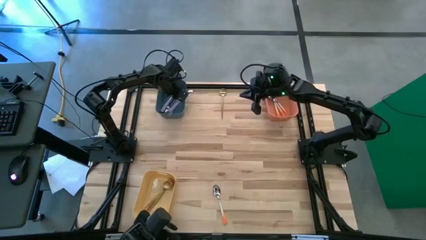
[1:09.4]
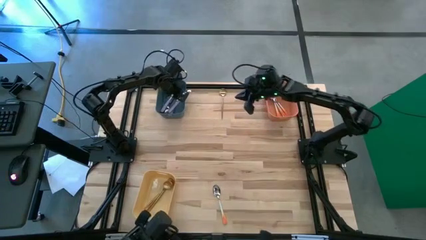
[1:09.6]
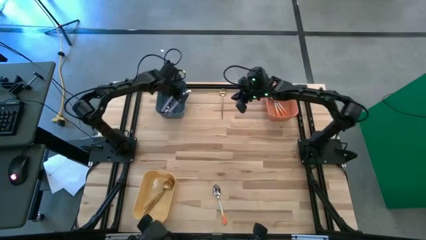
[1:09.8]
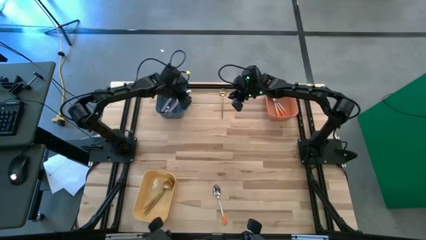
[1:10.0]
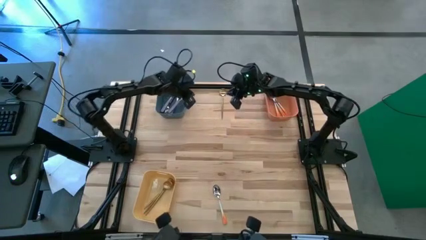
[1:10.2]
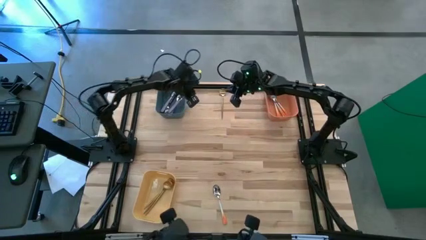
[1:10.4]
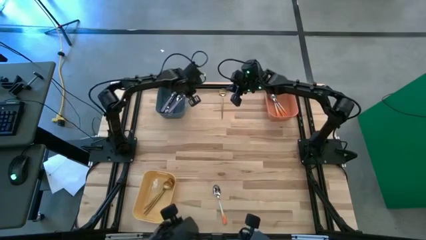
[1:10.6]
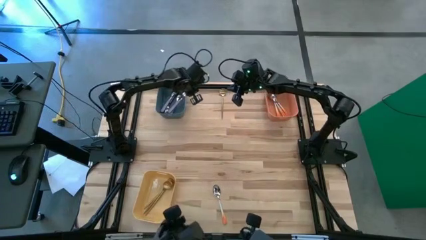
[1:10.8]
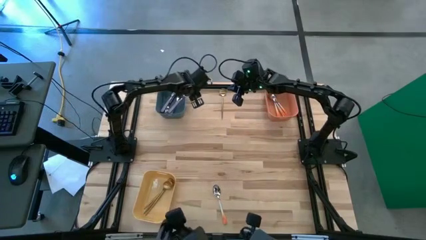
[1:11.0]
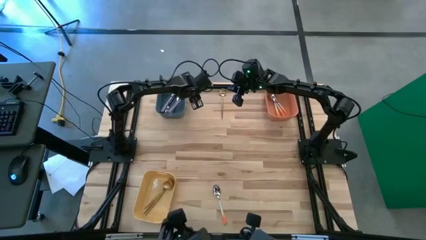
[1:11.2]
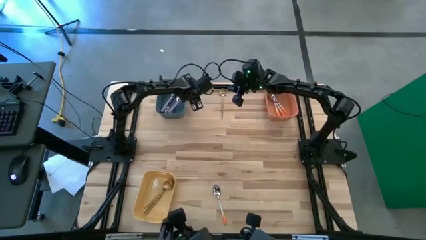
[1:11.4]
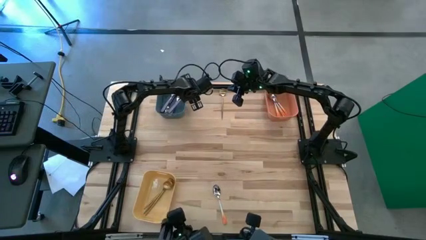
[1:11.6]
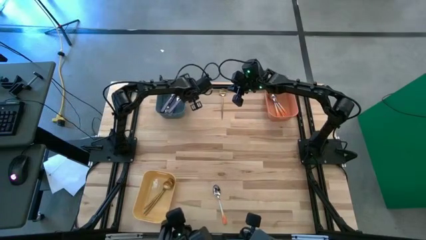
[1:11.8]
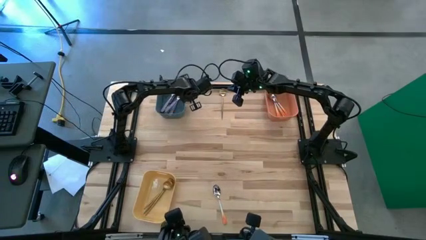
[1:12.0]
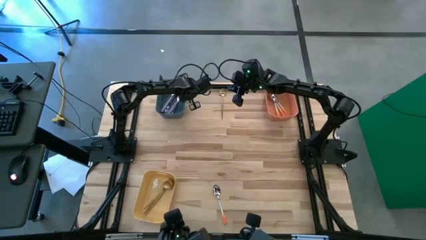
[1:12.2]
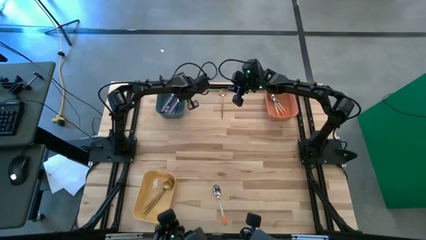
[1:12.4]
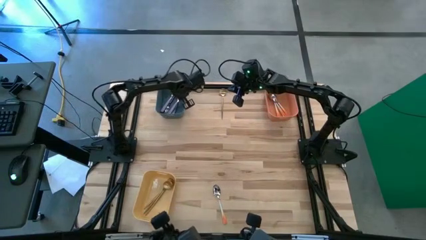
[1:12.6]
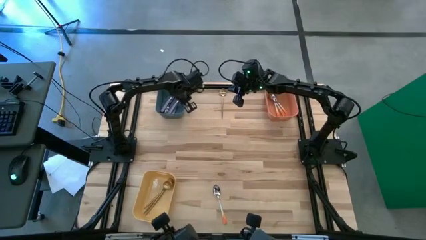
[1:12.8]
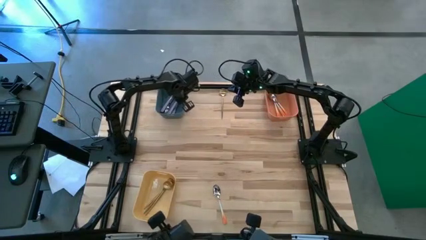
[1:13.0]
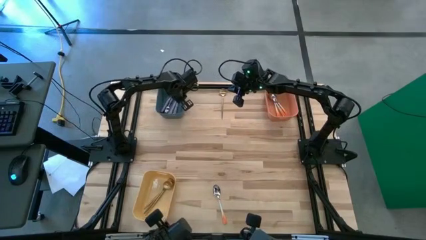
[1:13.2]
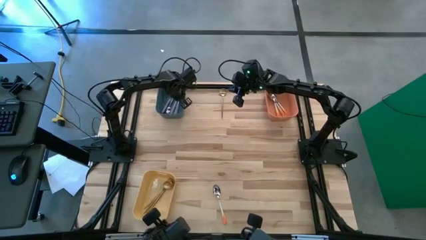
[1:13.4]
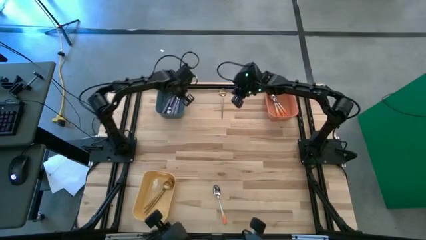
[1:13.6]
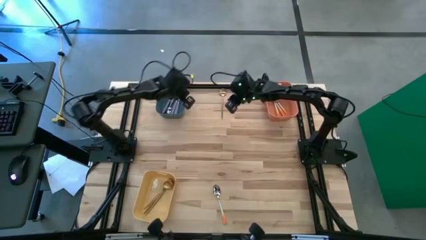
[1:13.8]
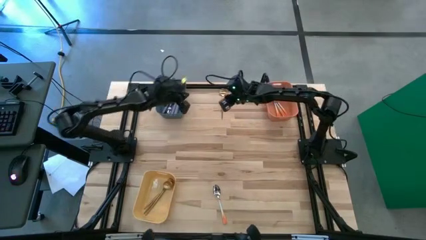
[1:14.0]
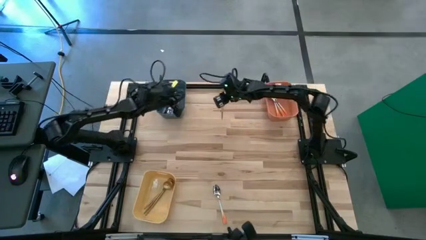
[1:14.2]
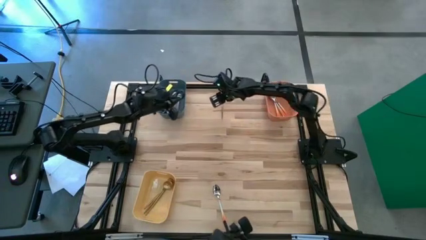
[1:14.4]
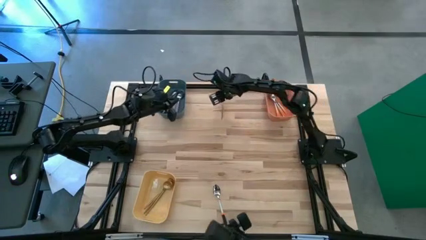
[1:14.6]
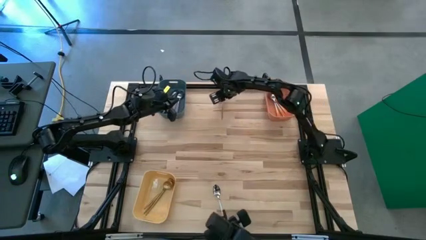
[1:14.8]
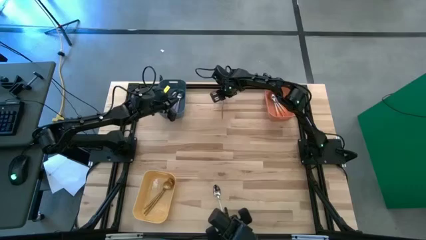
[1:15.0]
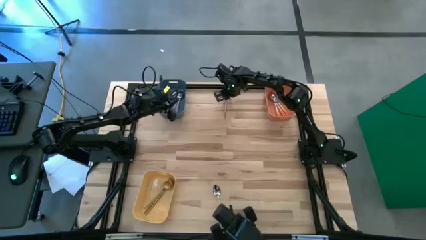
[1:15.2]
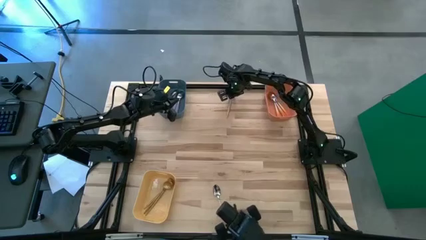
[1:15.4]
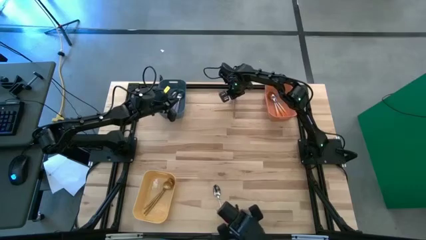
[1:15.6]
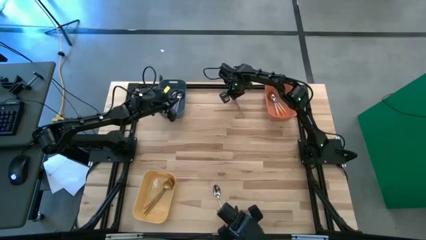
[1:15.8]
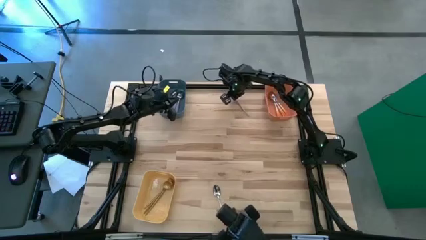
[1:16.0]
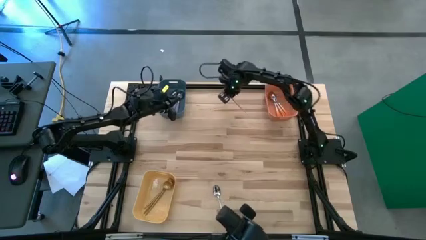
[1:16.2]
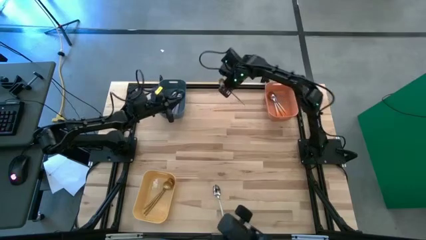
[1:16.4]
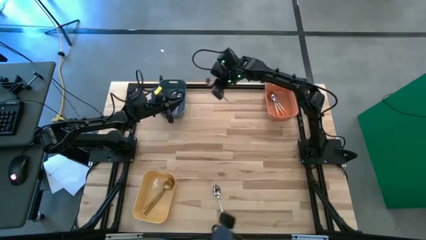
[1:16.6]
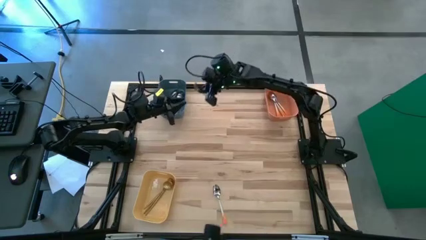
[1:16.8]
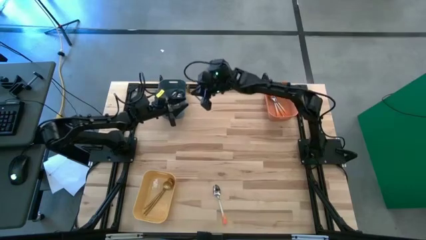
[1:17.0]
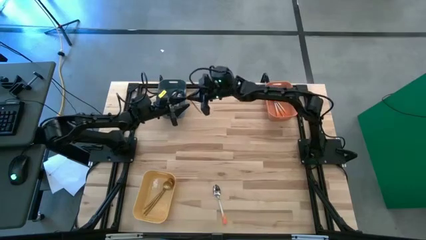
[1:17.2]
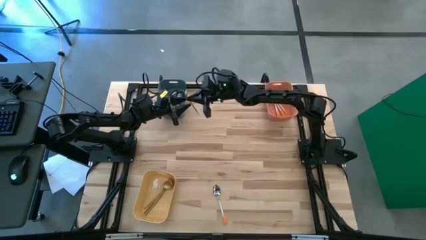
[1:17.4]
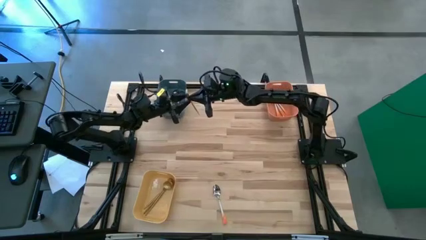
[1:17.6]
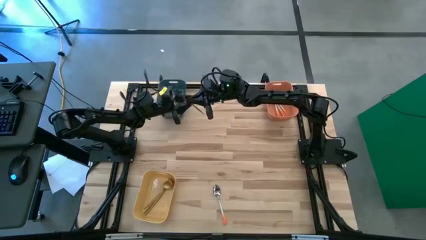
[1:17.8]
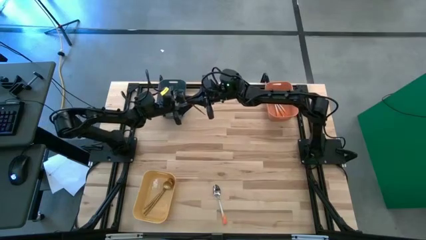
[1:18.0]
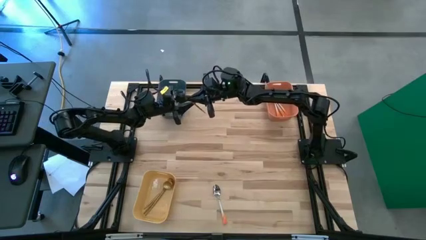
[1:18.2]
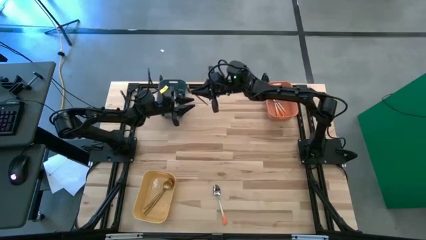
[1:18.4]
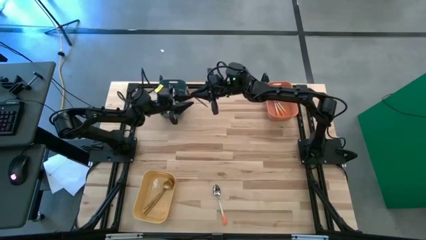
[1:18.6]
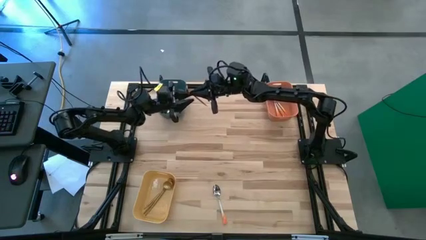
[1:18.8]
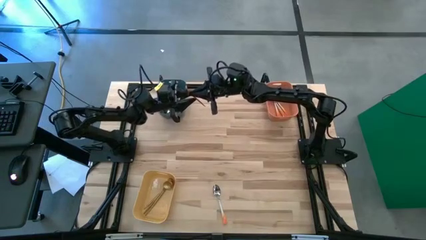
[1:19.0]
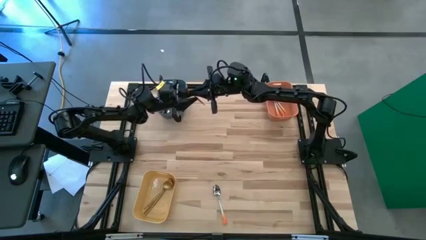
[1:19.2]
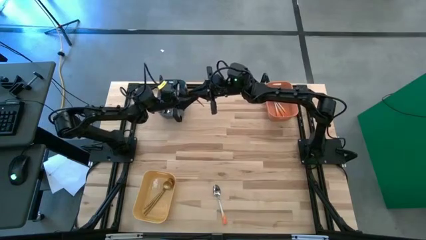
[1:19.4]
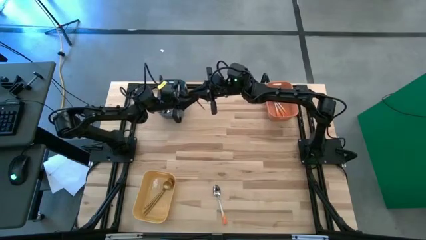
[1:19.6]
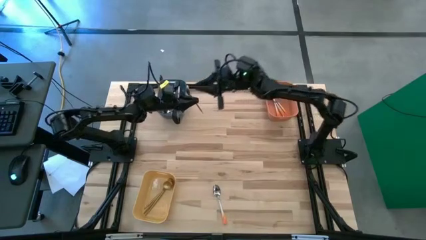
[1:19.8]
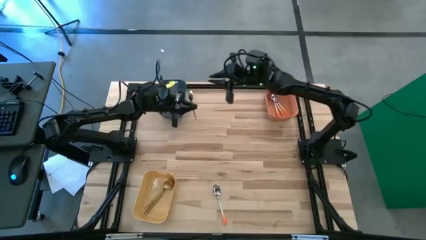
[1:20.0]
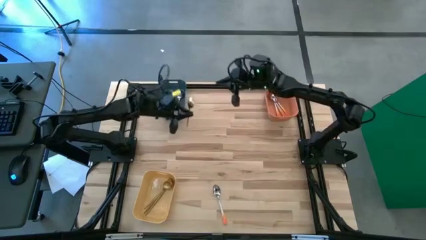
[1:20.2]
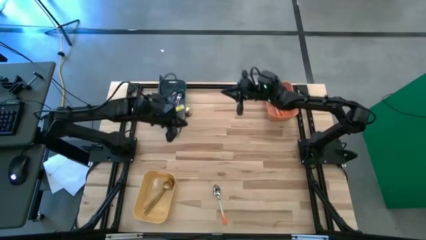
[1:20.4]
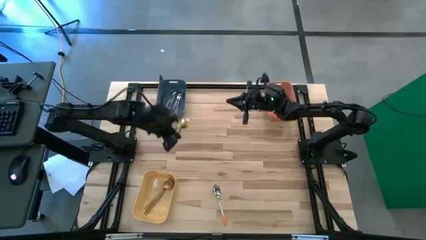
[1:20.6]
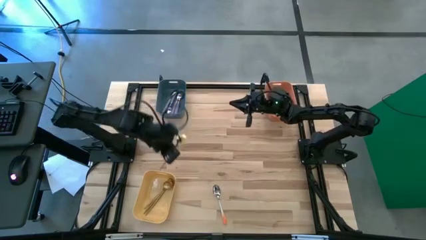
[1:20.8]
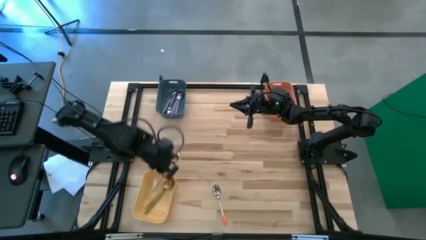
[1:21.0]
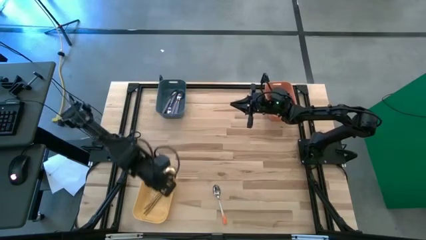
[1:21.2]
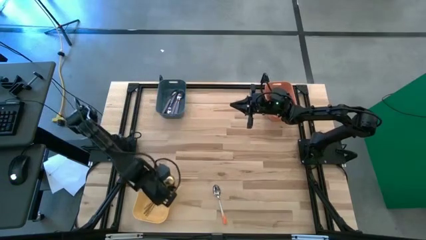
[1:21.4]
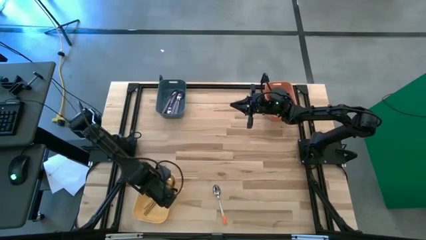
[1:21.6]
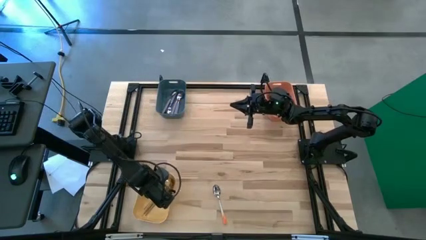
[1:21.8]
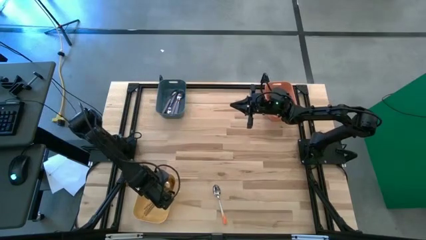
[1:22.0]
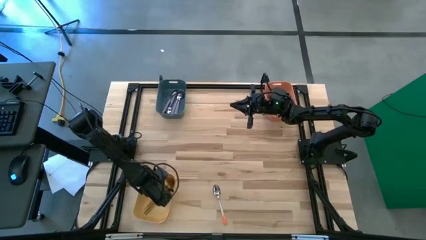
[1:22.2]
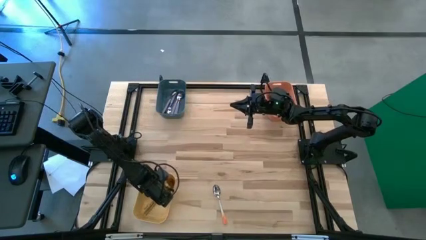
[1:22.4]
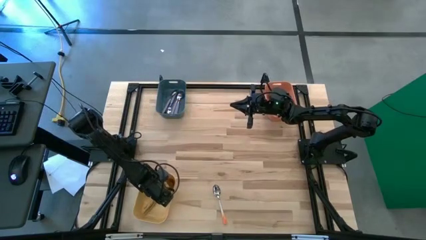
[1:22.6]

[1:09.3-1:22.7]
Task: Sort silverware by color (type)
Put the gold spoon into the yellow bin

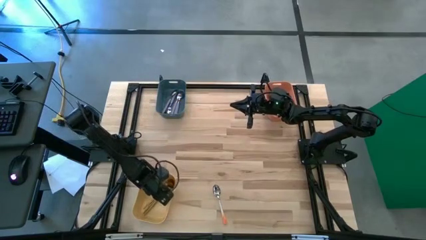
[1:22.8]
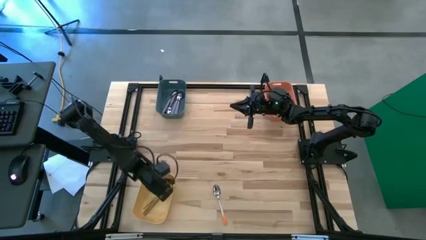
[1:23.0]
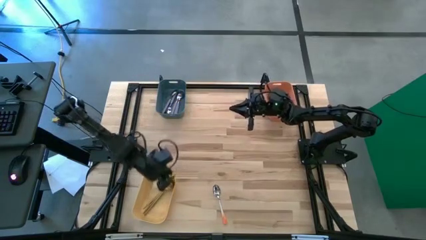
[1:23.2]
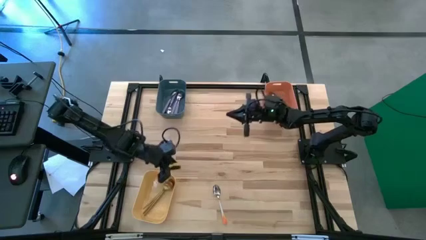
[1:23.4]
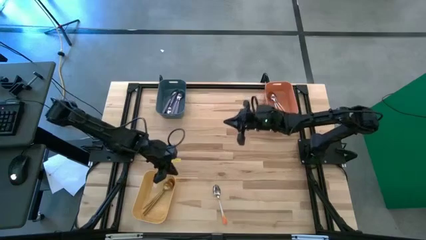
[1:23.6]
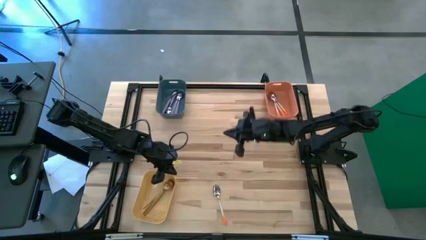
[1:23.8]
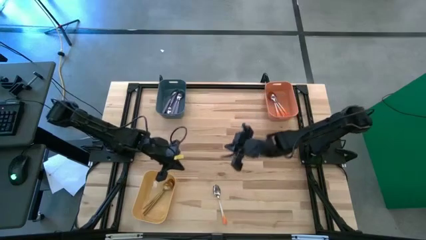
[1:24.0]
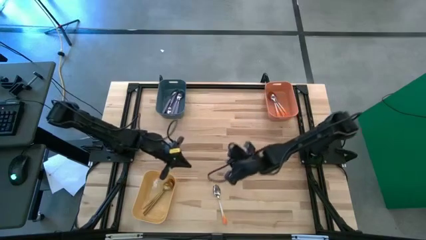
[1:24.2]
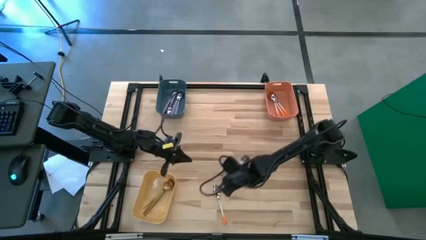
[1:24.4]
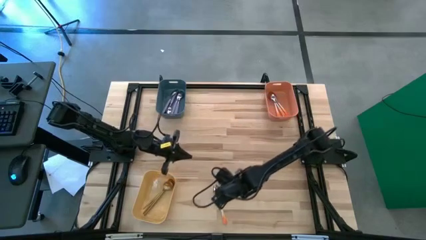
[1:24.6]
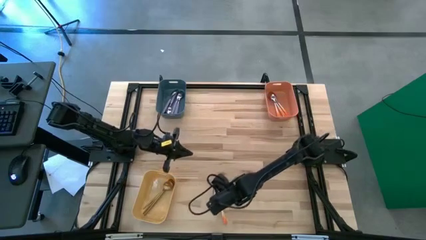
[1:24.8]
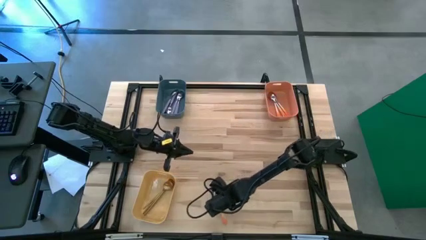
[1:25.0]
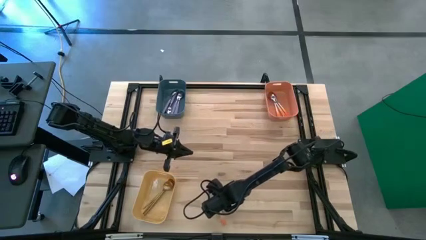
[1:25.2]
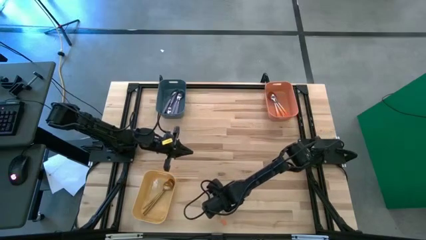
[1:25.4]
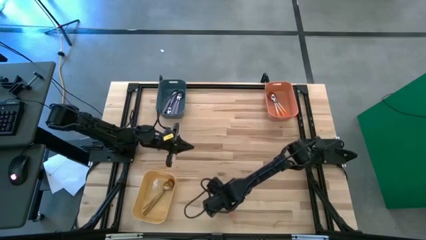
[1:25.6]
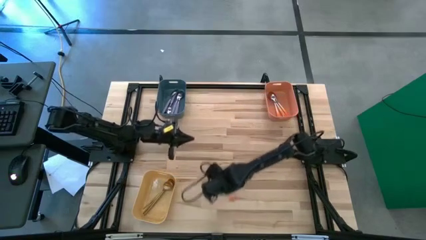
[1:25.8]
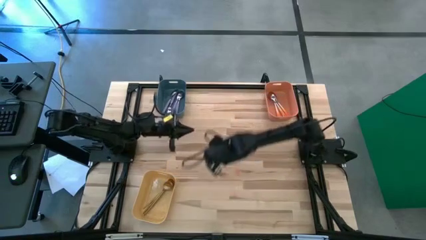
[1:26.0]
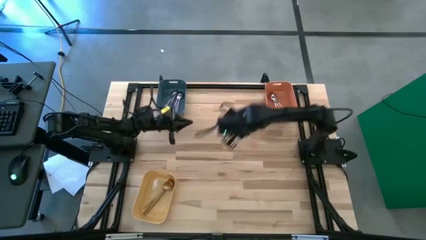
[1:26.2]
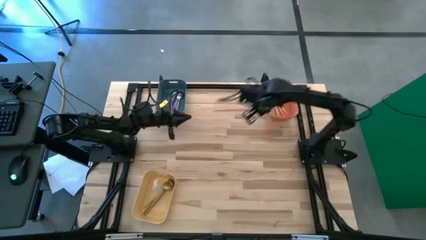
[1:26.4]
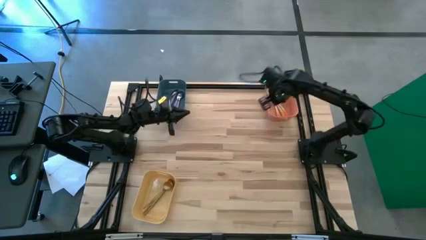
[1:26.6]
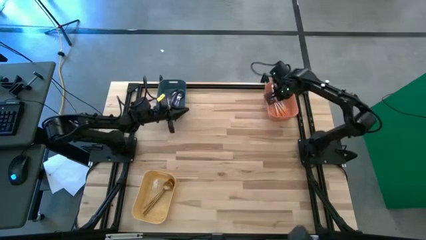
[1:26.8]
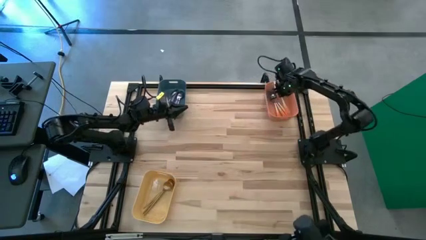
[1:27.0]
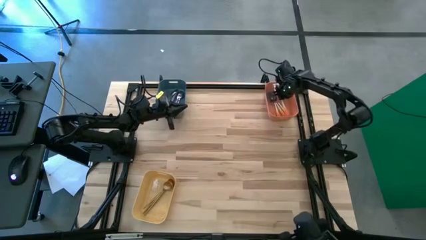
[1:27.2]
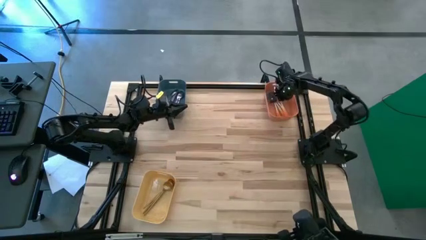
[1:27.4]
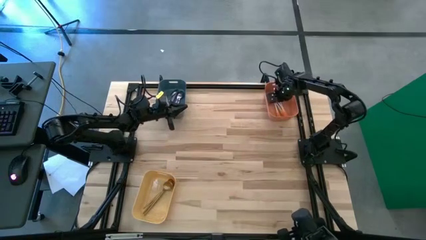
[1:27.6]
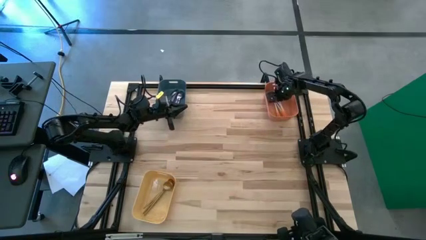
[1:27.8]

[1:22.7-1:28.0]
Put the orange spoon into the orange bin
